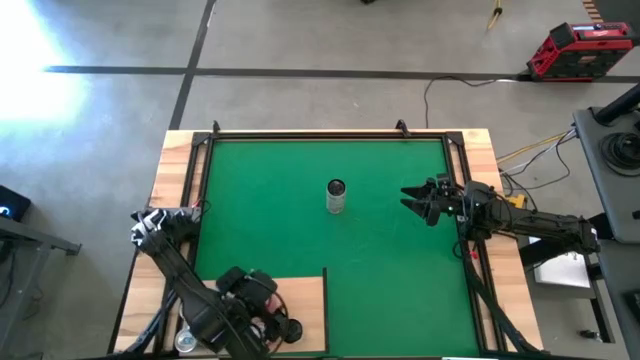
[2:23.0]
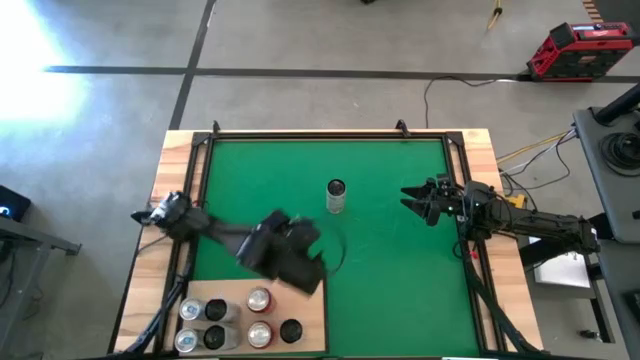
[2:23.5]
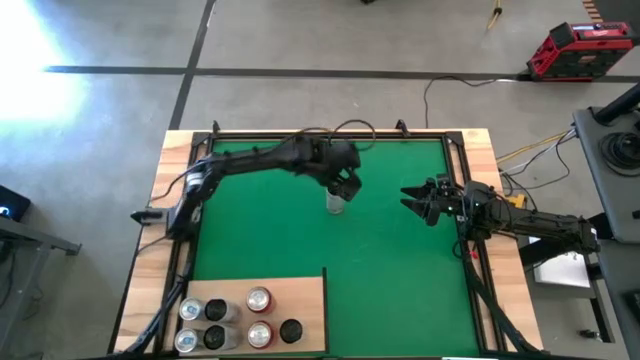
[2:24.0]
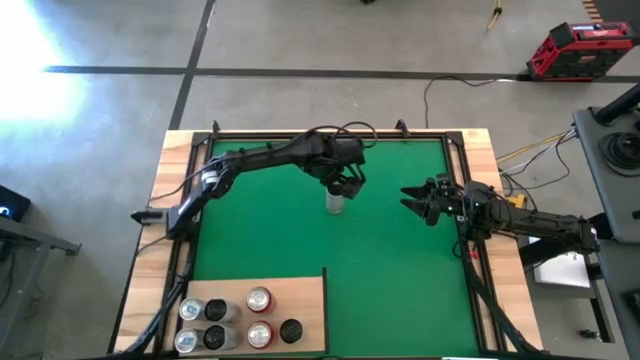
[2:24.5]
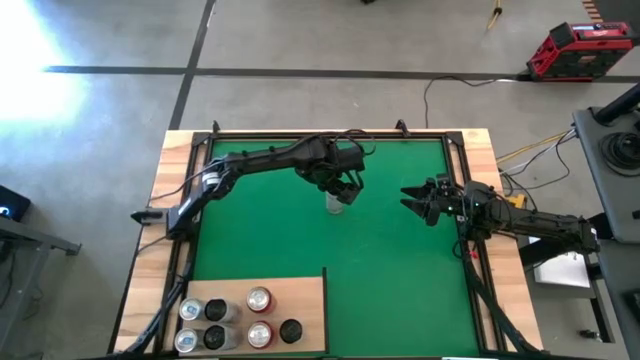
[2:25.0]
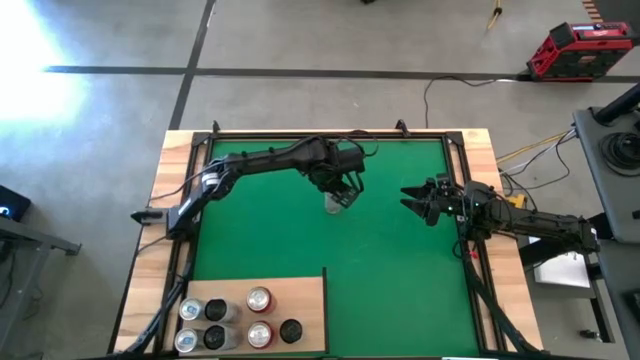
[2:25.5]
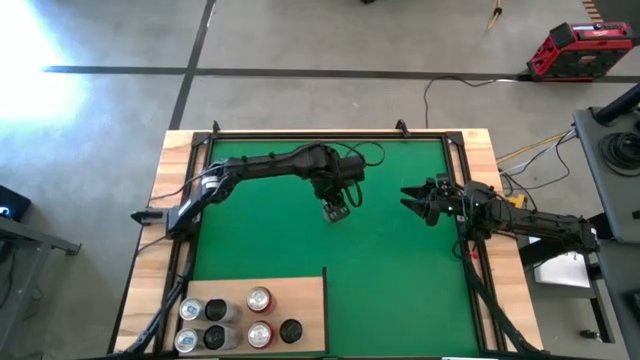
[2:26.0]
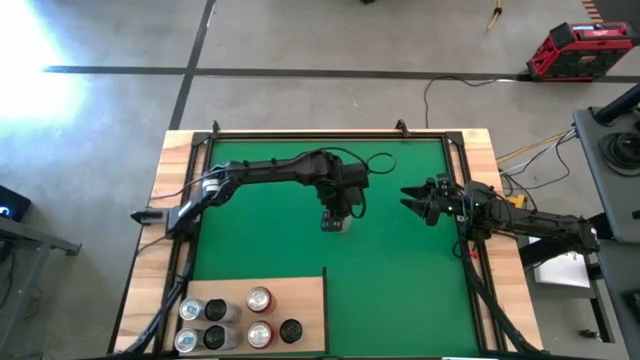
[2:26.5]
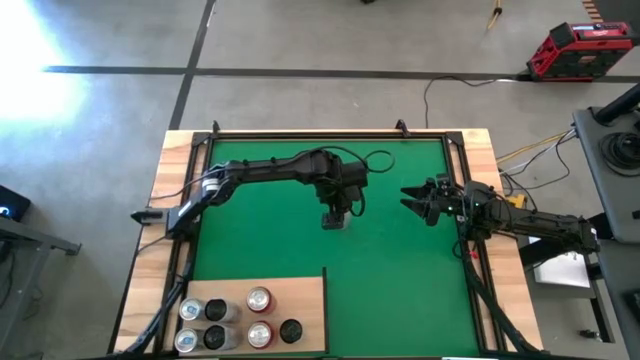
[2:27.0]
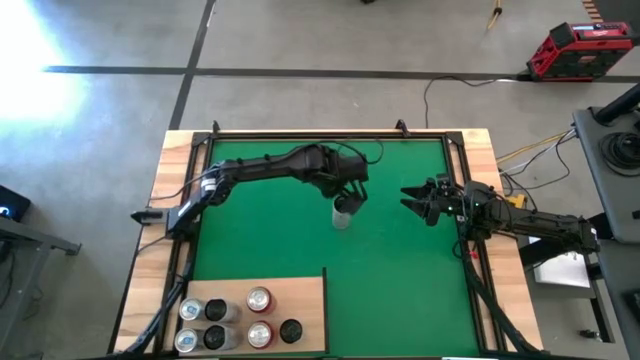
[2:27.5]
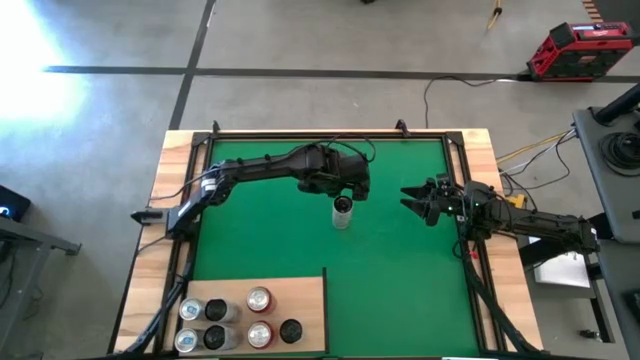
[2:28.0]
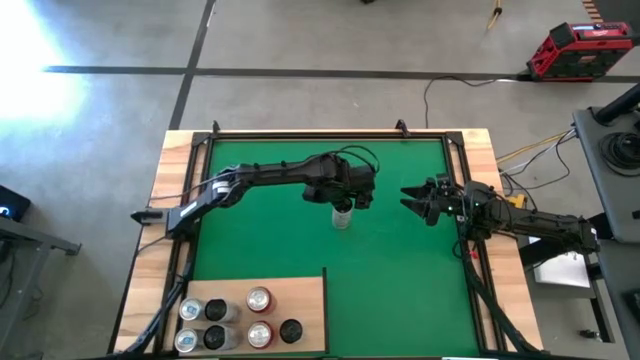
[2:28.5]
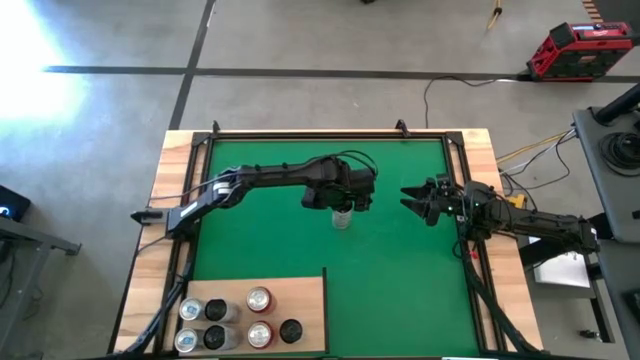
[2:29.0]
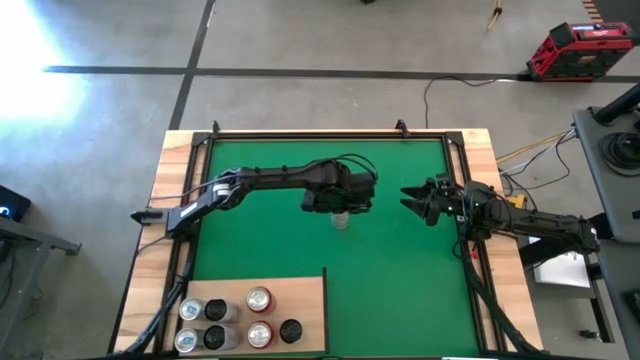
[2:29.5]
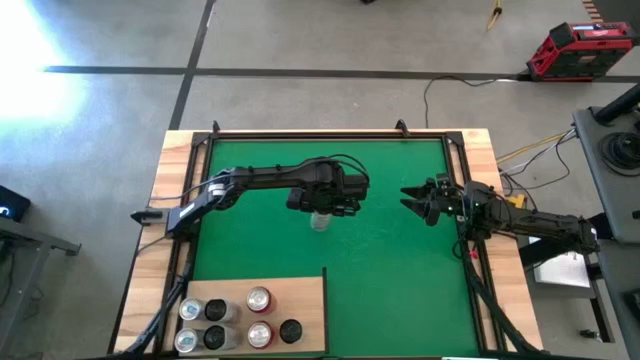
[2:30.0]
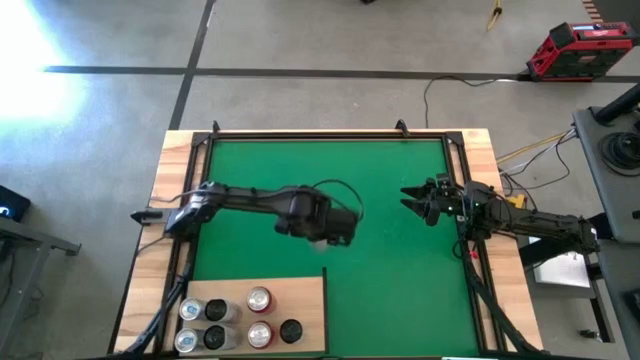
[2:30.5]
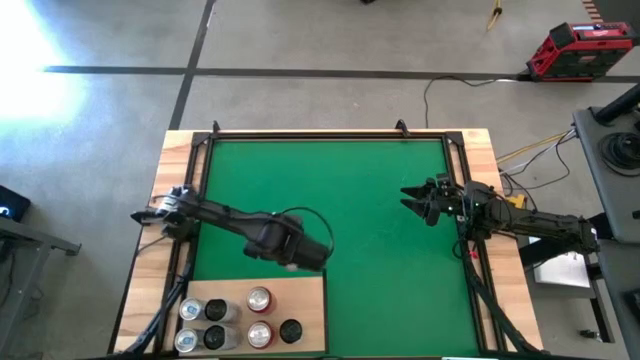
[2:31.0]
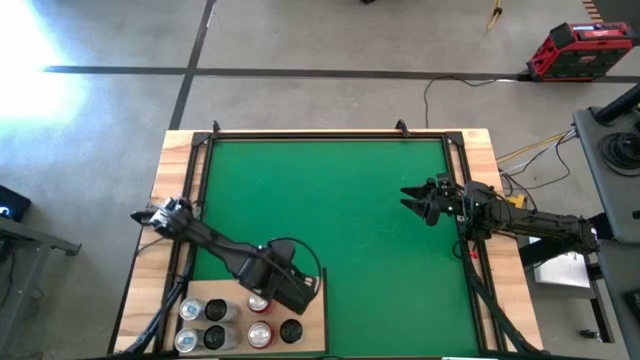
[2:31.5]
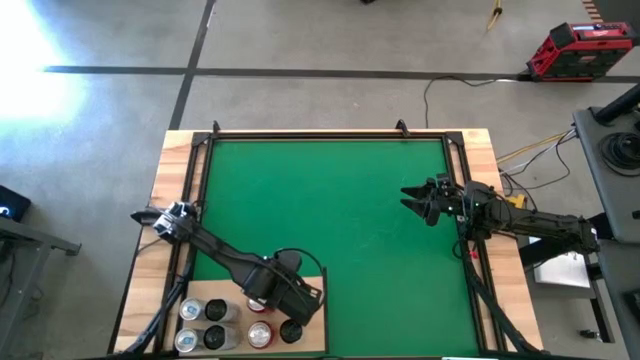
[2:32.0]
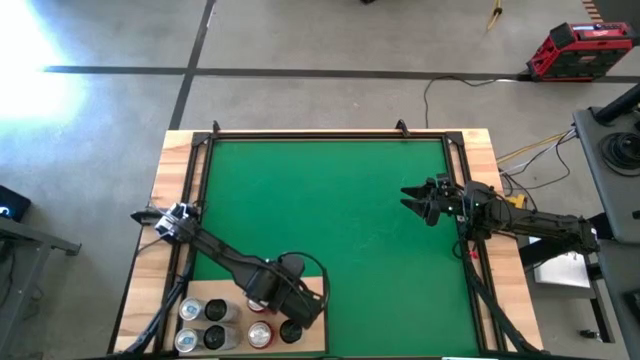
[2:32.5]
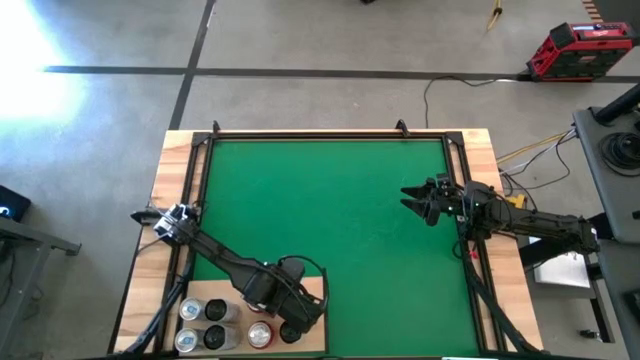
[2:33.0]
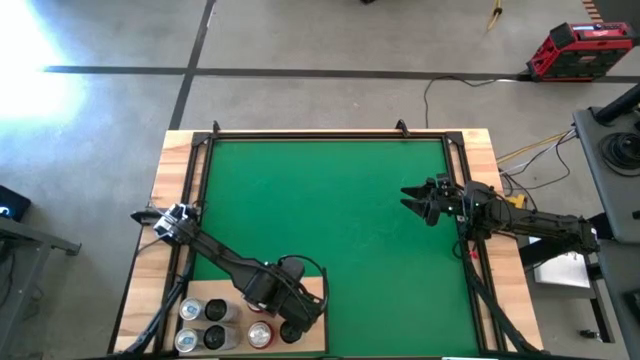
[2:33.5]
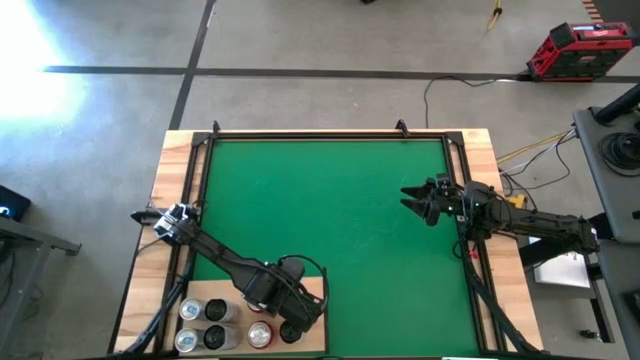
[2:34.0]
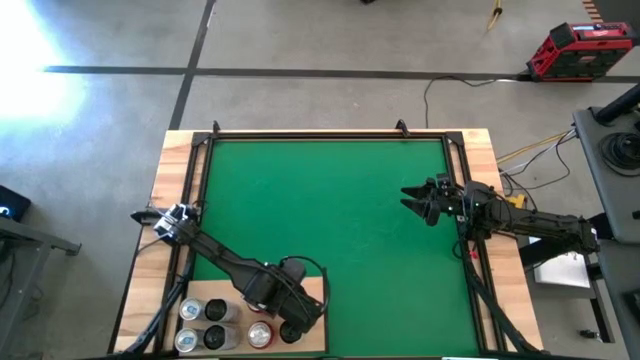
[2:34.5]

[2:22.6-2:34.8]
Task: Place canned beverage on shelf
Put the white and yellow soda can on the shelf align with the other white and yellow soda can

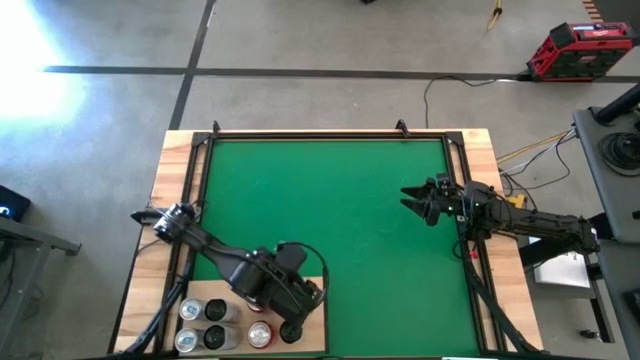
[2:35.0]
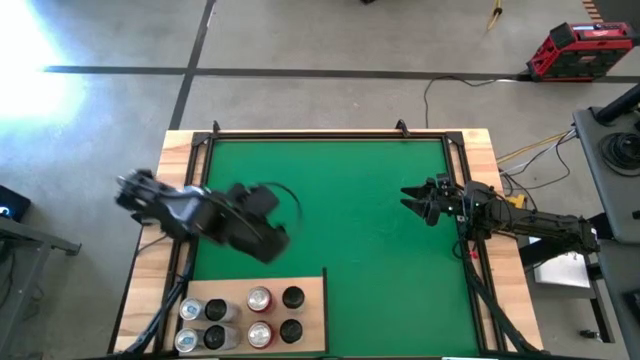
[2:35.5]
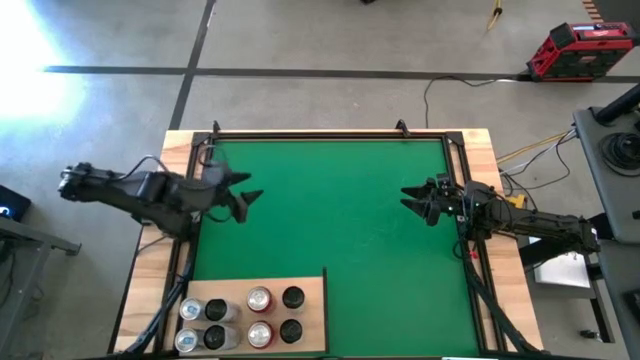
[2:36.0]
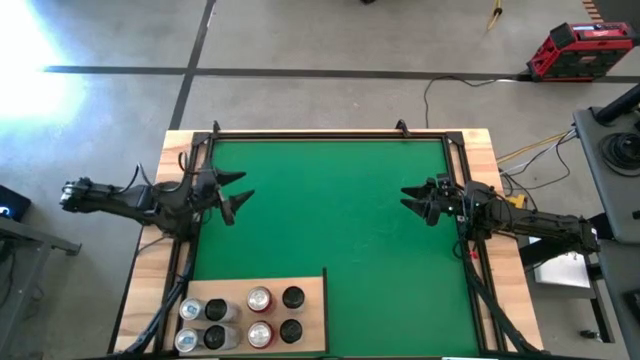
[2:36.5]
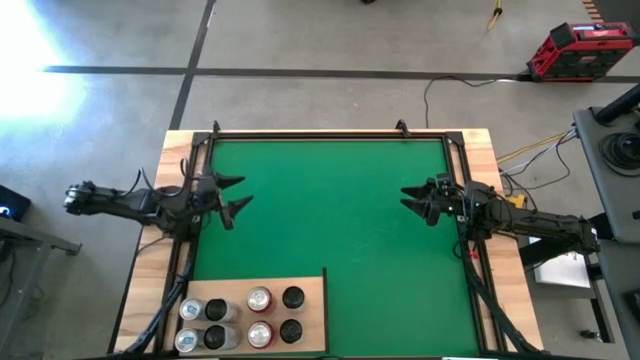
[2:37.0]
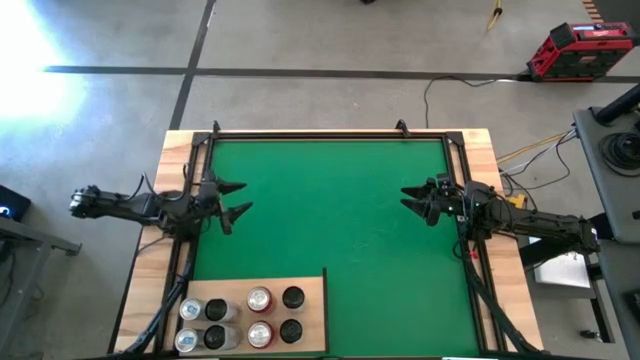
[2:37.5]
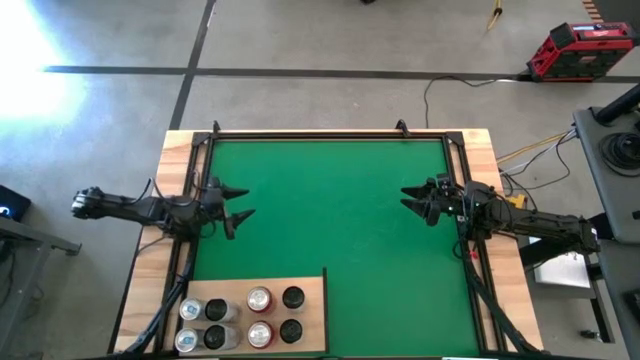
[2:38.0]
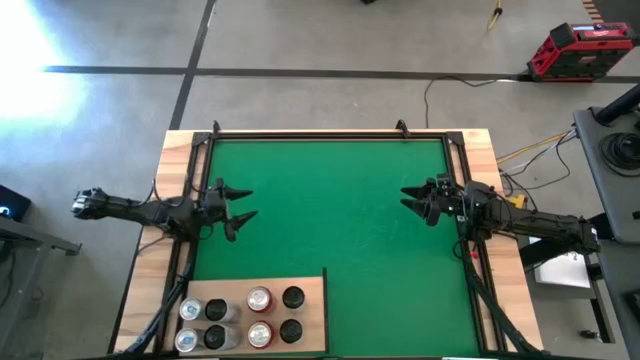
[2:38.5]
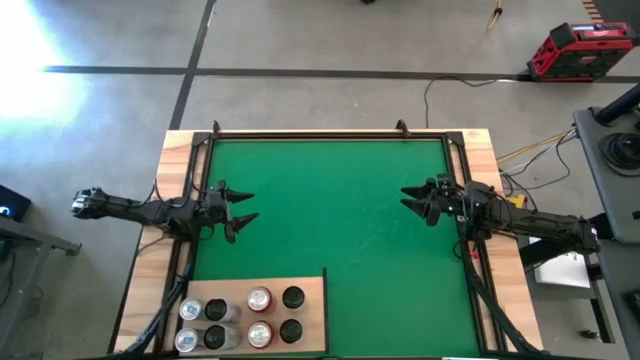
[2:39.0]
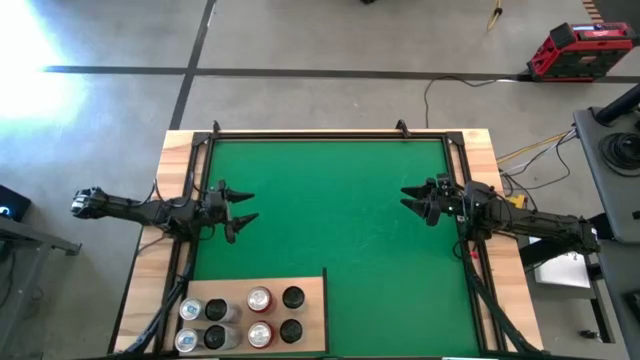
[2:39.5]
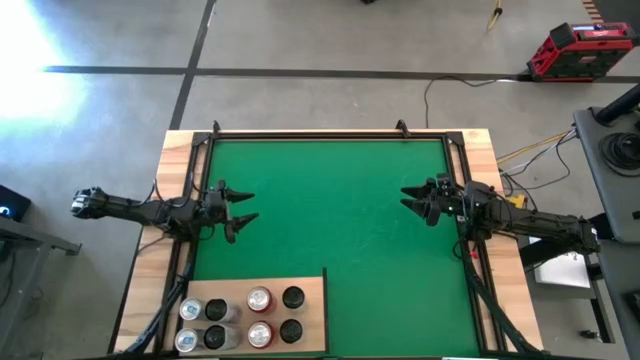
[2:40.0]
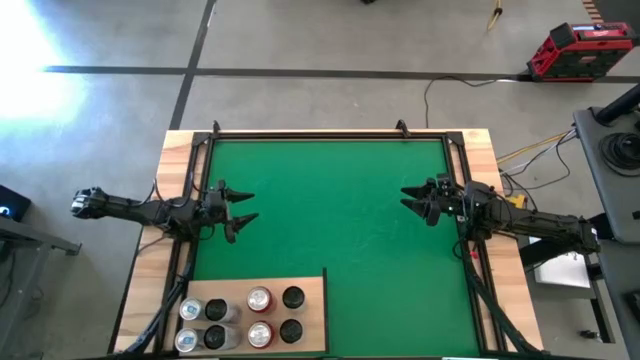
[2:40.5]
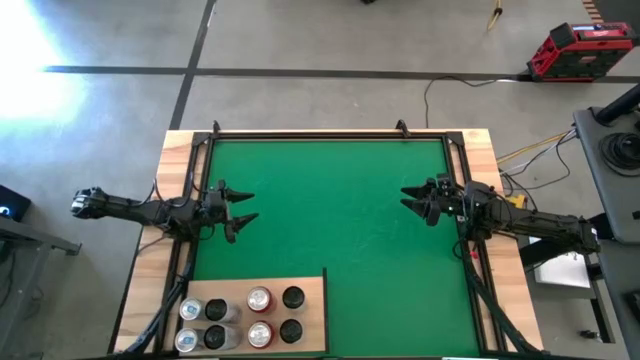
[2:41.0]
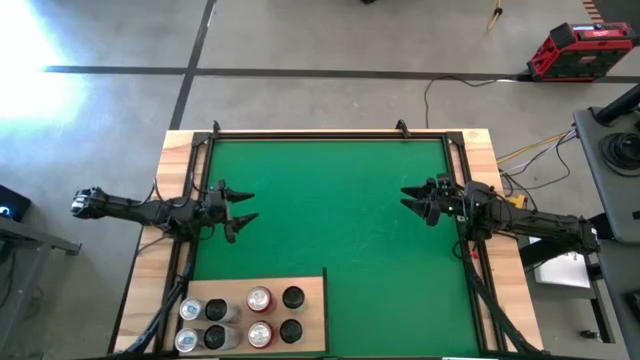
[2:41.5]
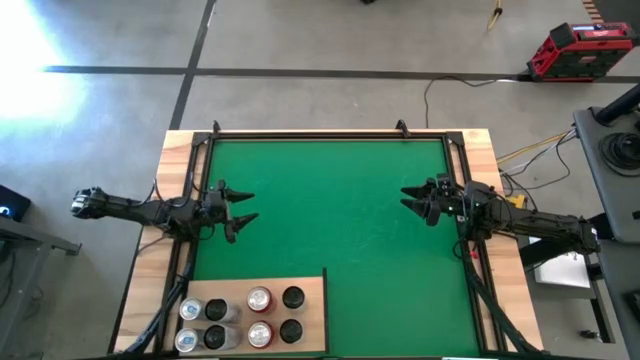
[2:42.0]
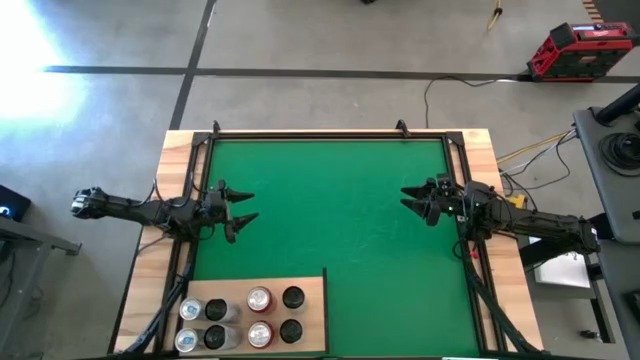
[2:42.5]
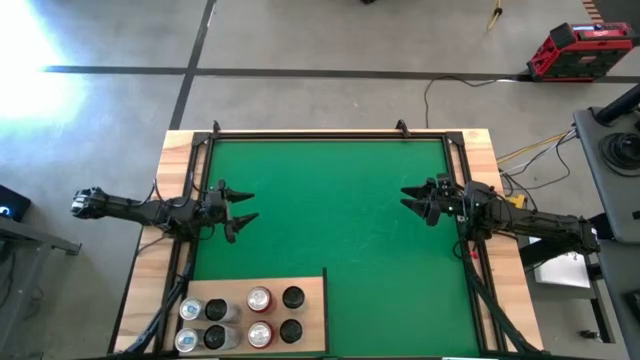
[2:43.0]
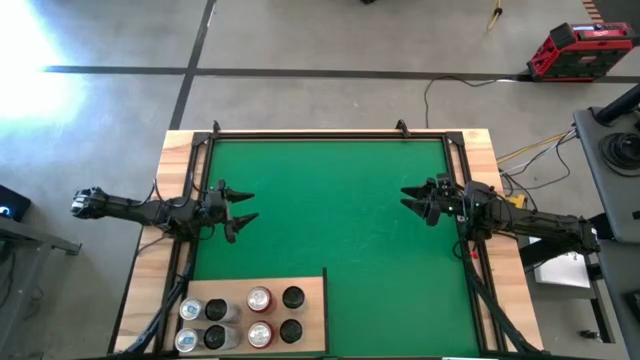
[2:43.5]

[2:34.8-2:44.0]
Return to Home Position
